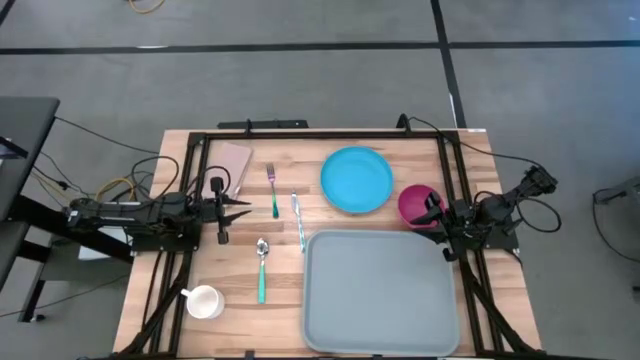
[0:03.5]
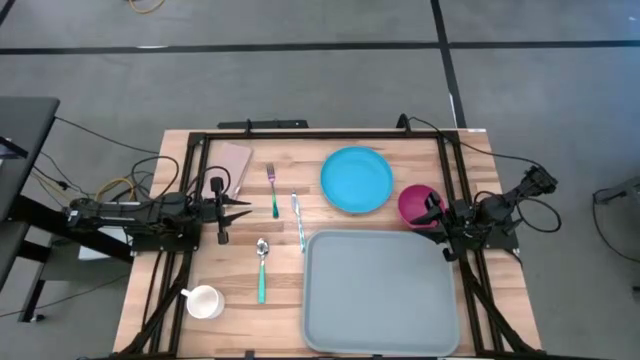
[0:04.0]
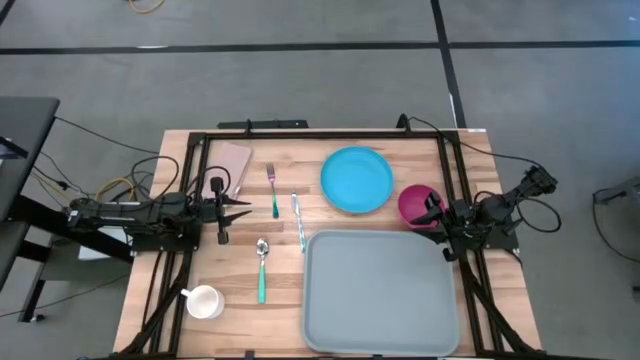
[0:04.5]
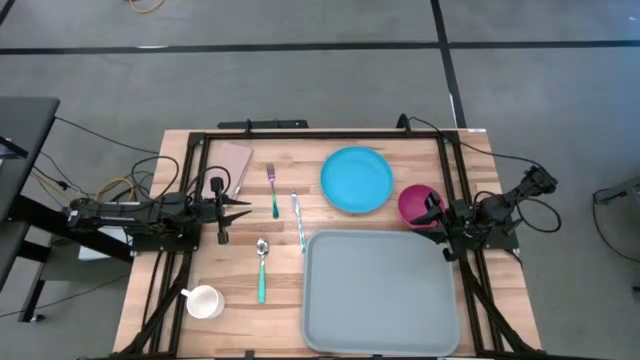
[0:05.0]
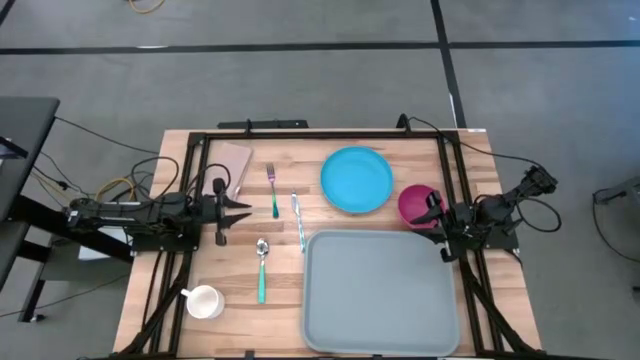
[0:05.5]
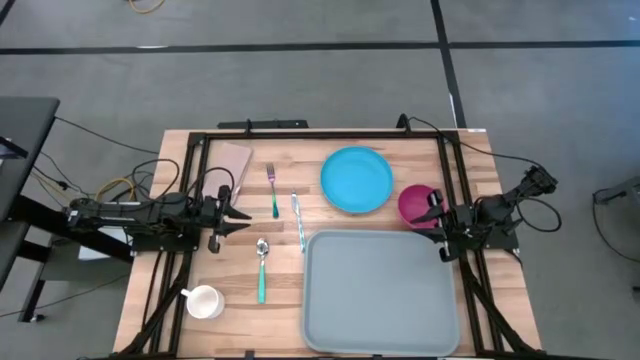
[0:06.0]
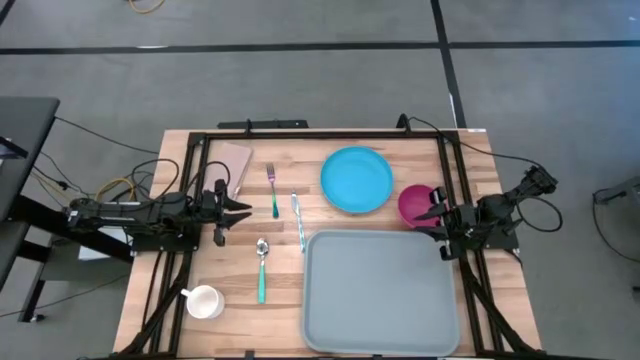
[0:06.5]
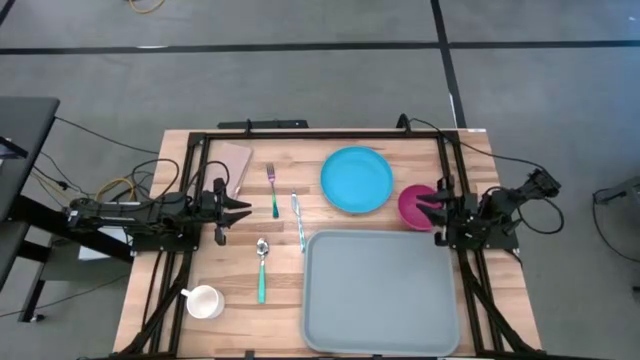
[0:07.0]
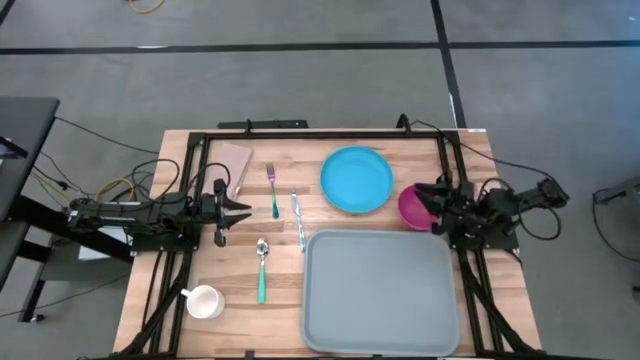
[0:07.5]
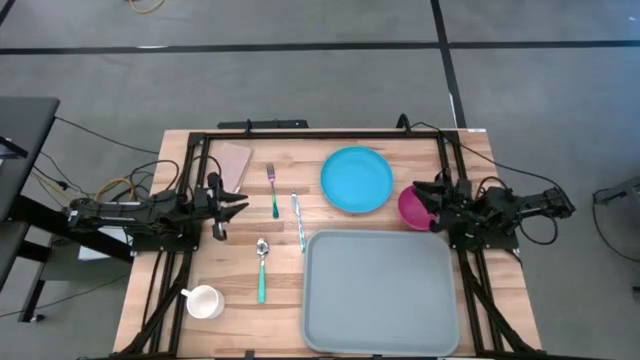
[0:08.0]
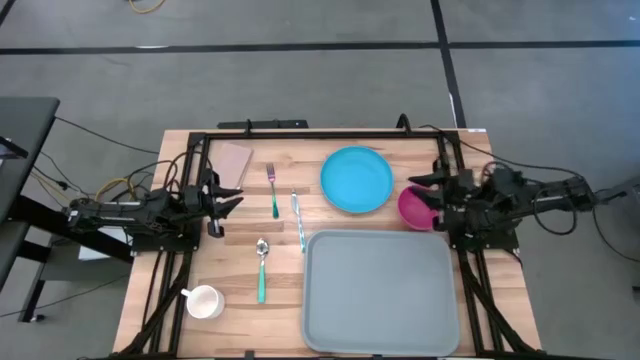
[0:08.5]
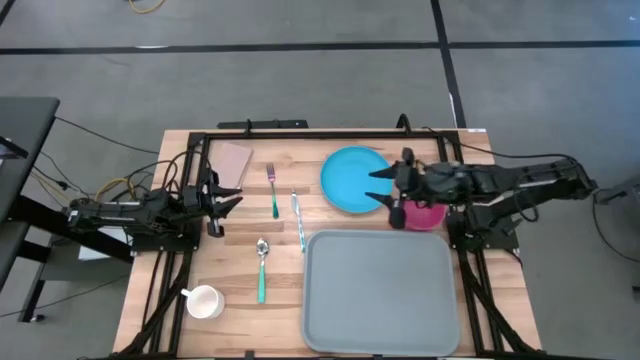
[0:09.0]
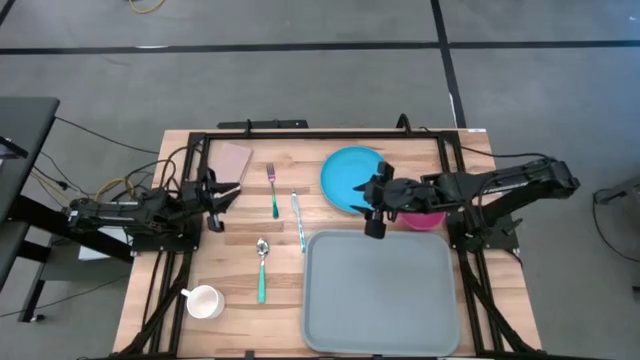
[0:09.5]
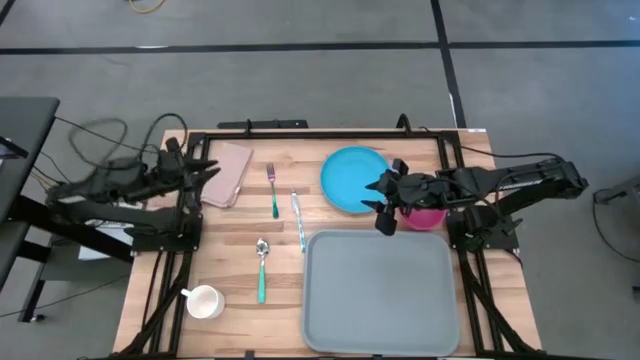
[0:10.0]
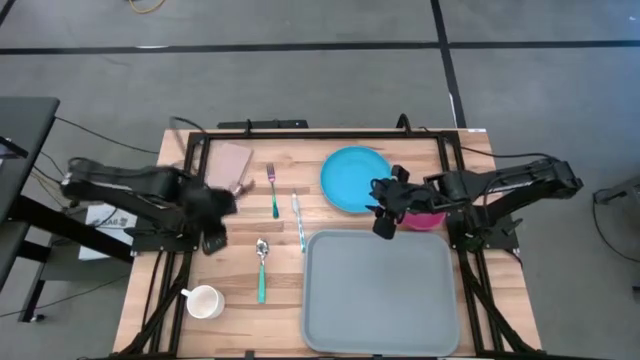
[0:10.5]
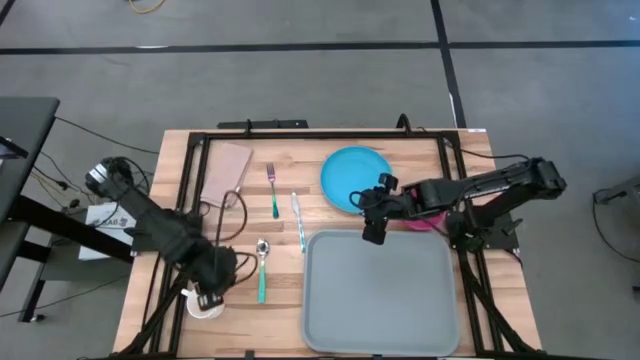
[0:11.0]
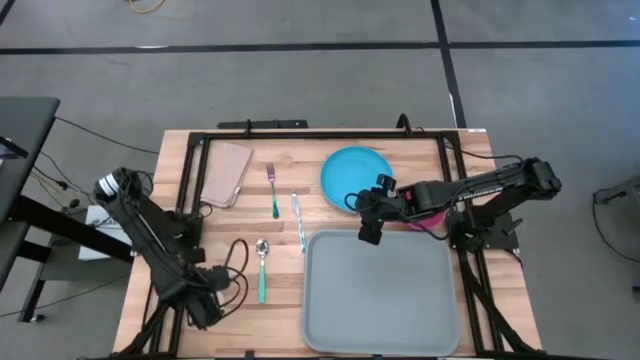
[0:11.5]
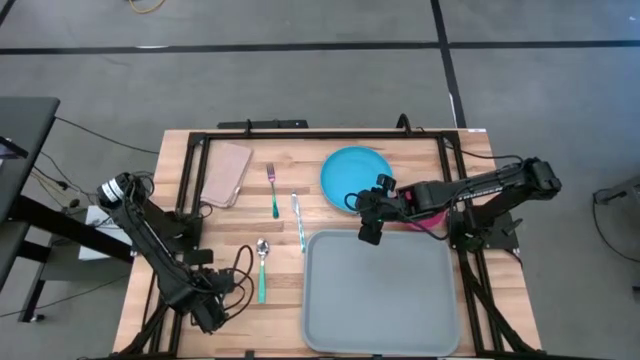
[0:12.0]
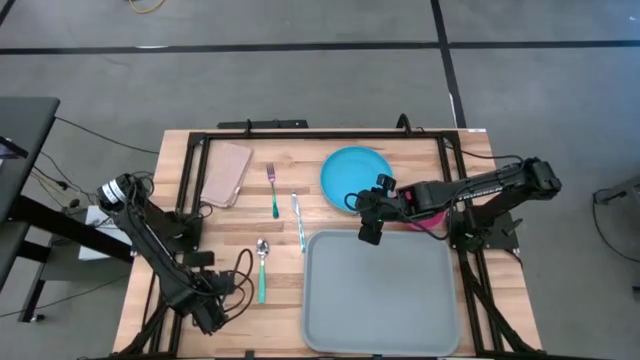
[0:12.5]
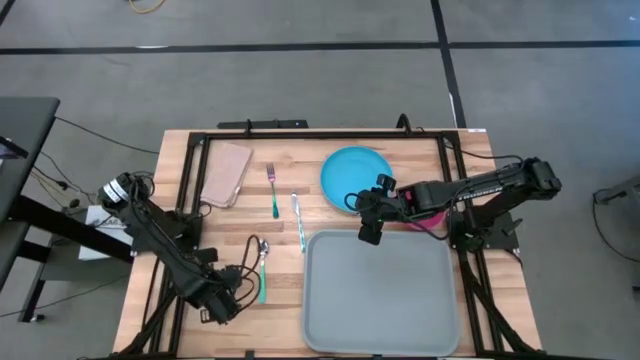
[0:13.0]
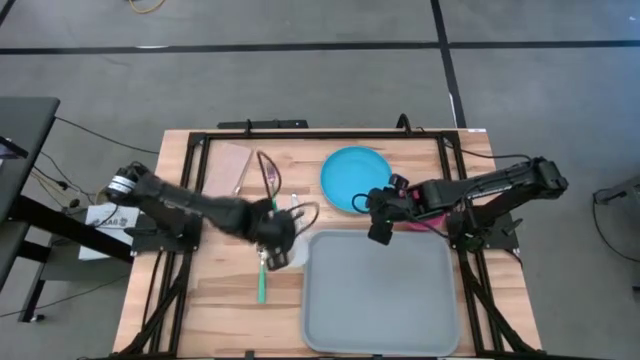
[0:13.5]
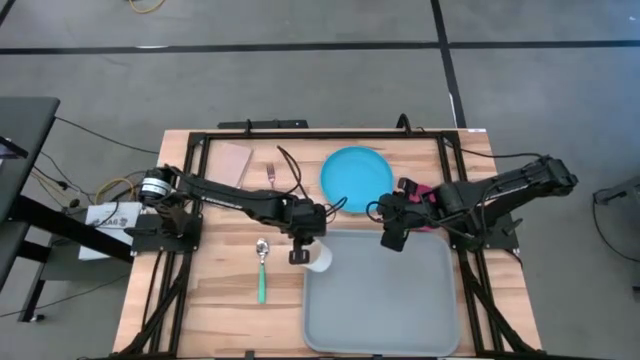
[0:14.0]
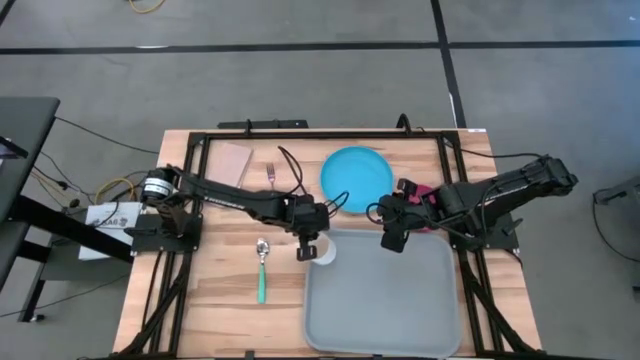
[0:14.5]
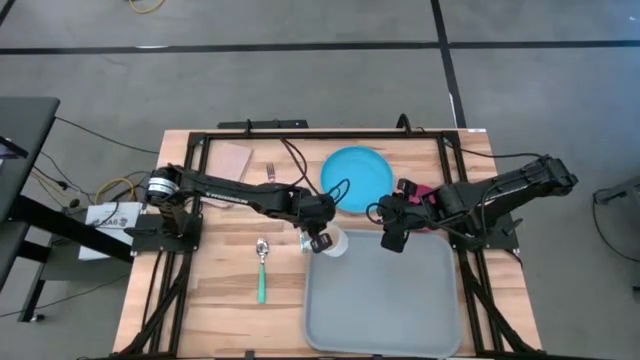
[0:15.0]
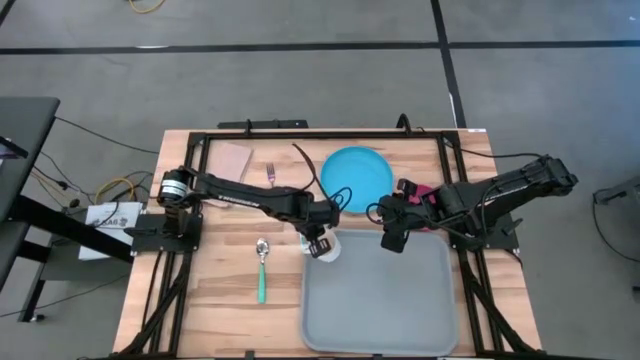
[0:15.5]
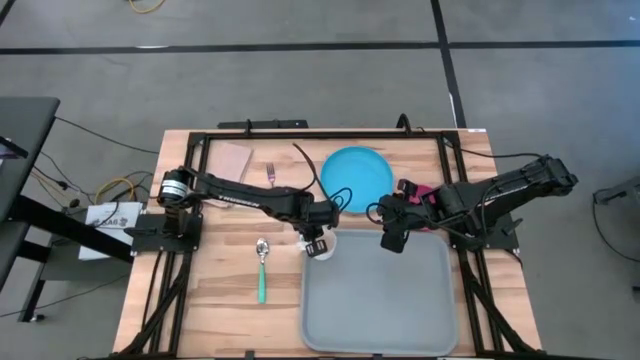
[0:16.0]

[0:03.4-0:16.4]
Task: Set up tray
Put the white mug on the gray tray

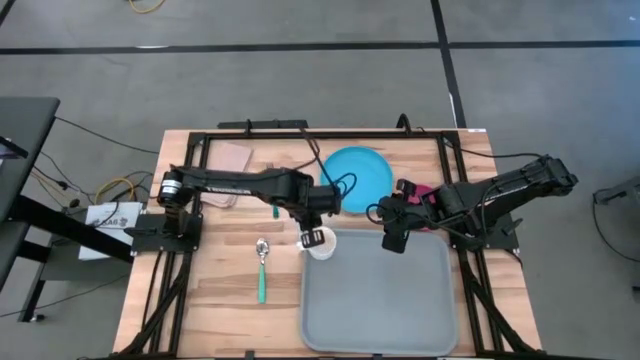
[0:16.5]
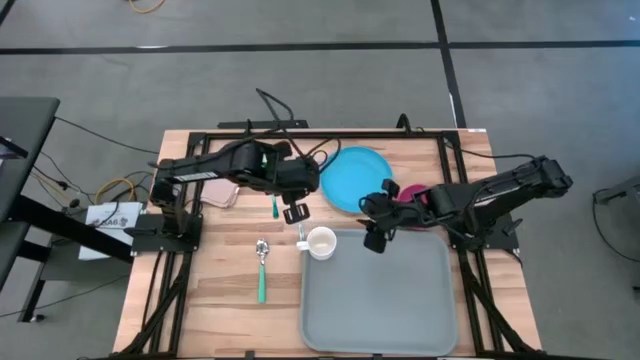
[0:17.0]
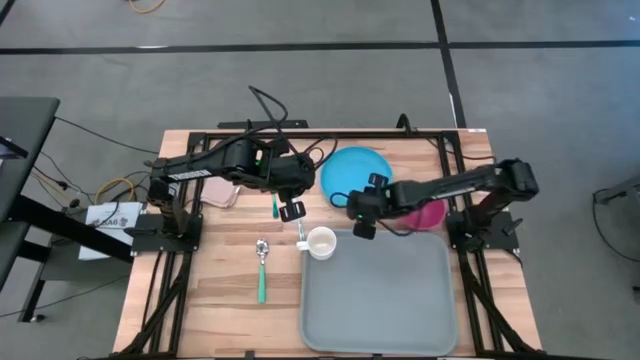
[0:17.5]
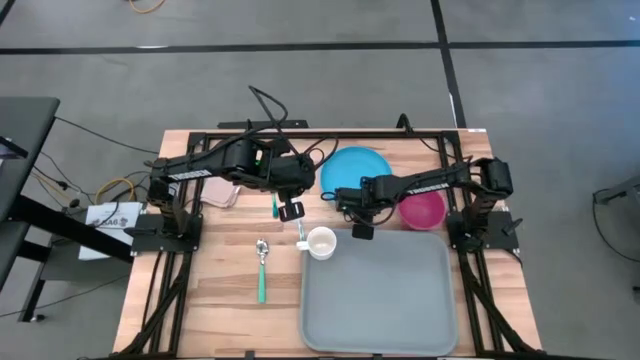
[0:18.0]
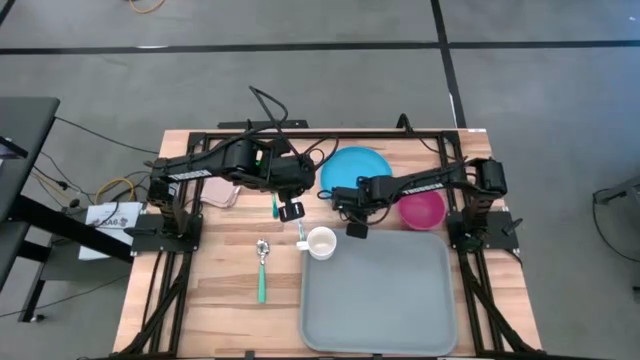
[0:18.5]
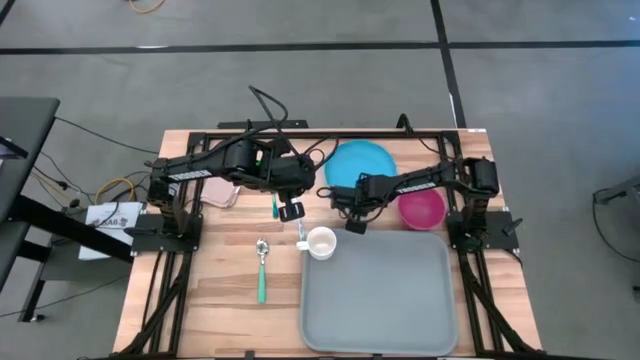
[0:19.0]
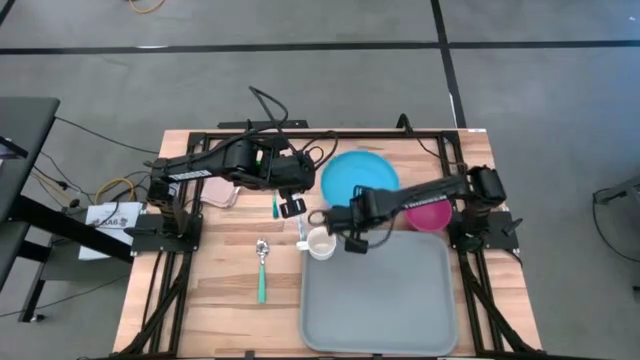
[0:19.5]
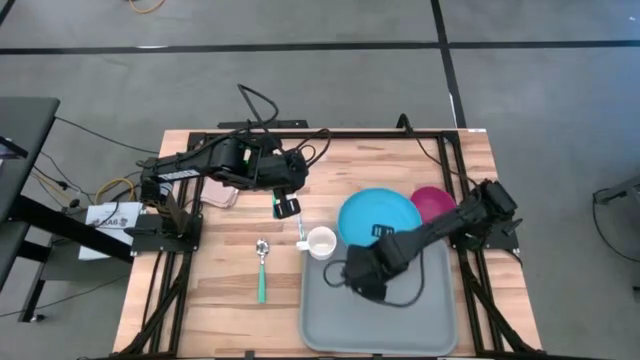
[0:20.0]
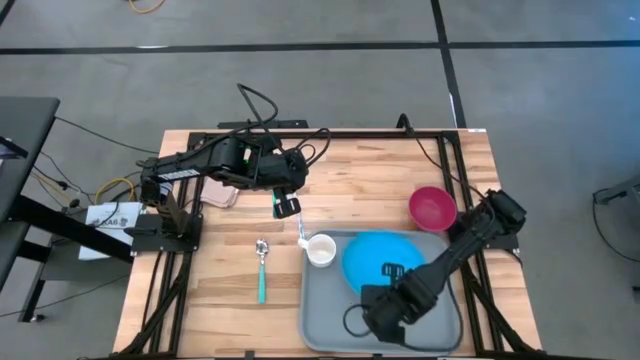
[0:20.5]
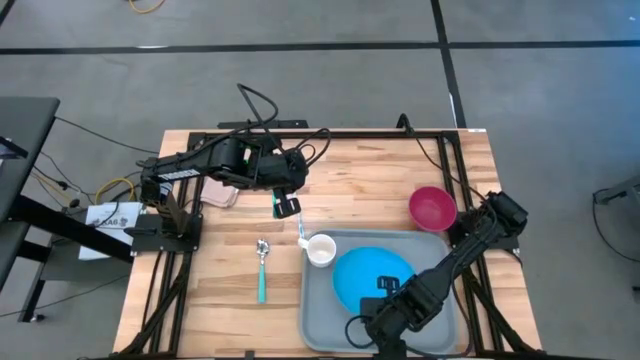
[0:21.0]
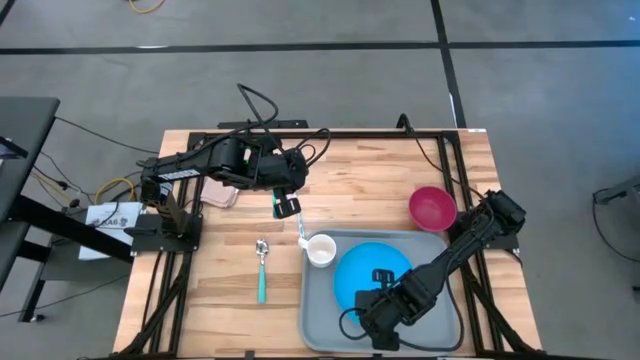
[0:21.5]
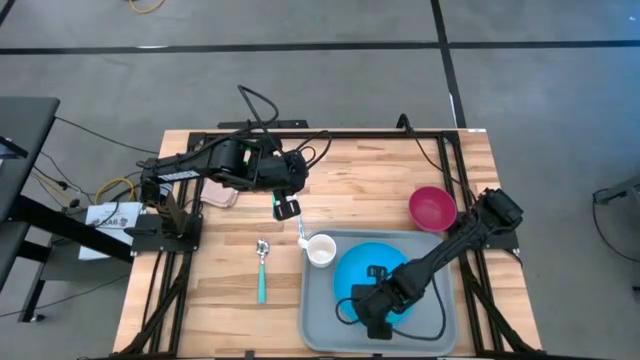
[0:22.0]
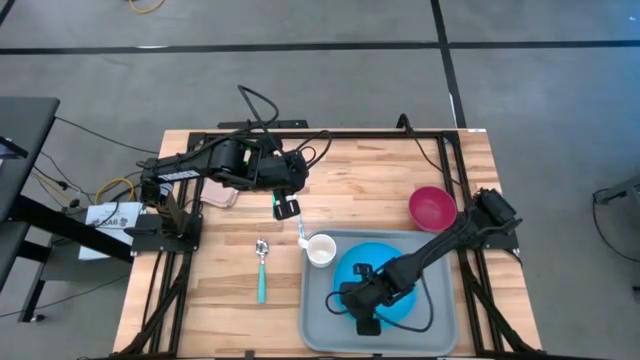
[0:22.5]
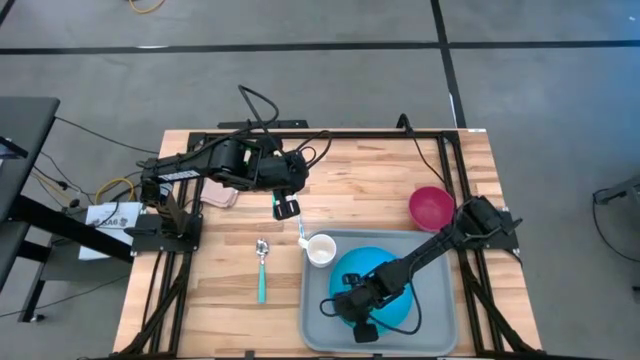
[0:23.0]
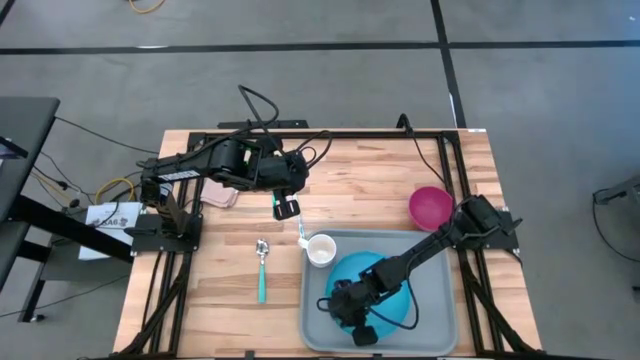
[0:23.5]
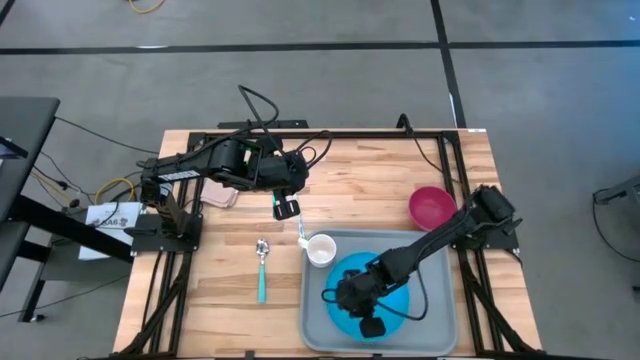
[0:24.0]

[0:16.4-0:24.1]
Put the blue plate on the gray tray
